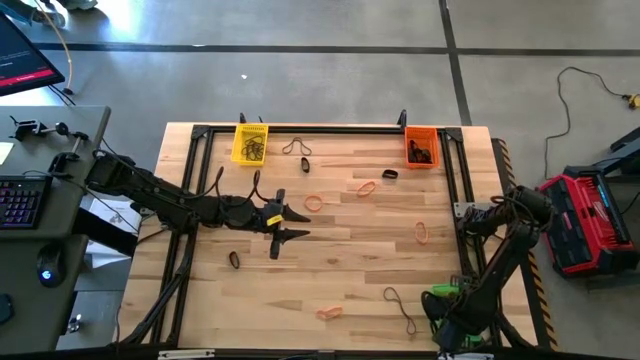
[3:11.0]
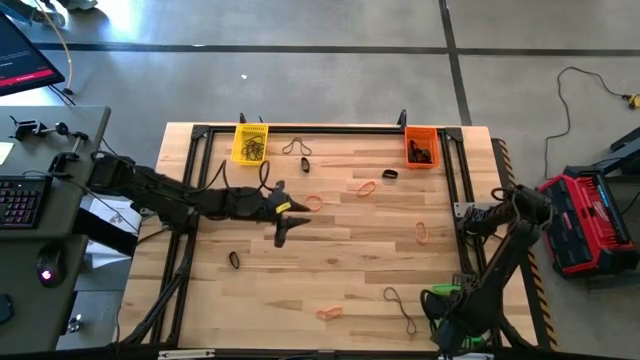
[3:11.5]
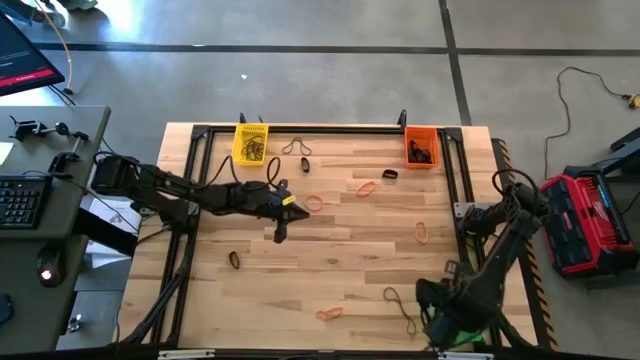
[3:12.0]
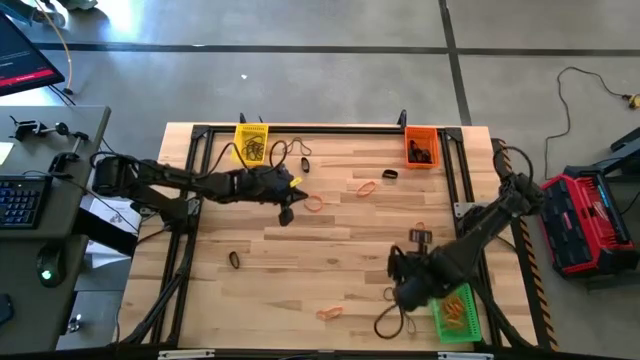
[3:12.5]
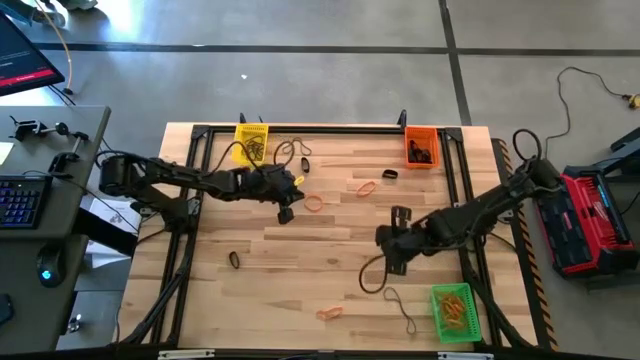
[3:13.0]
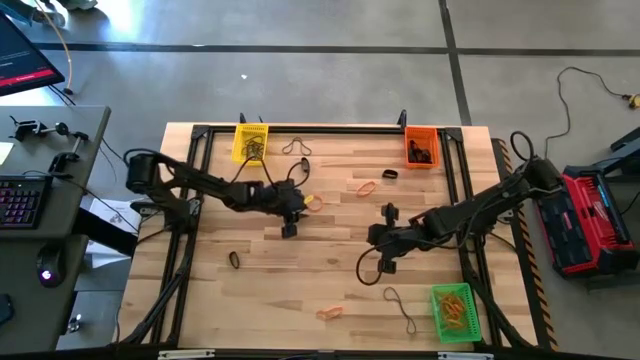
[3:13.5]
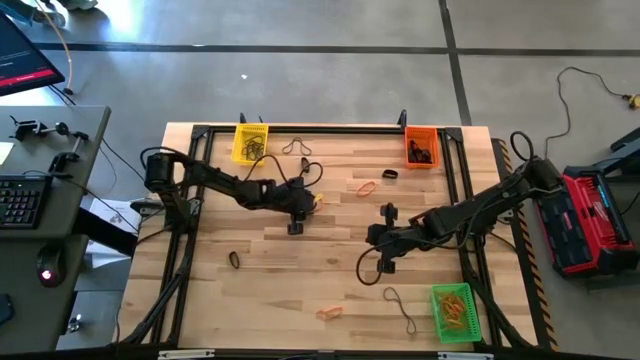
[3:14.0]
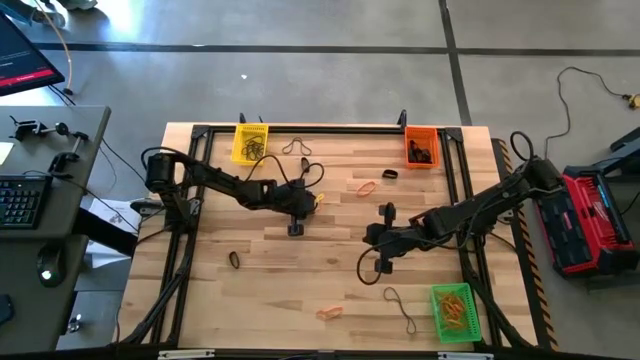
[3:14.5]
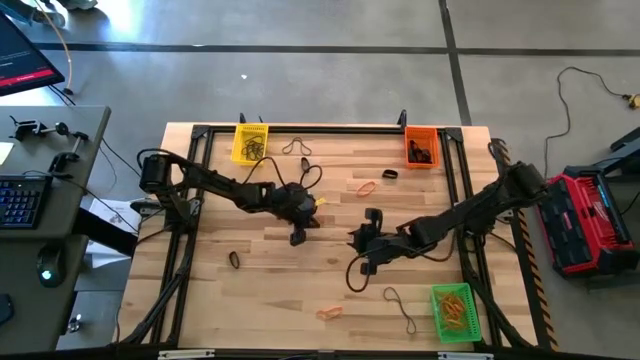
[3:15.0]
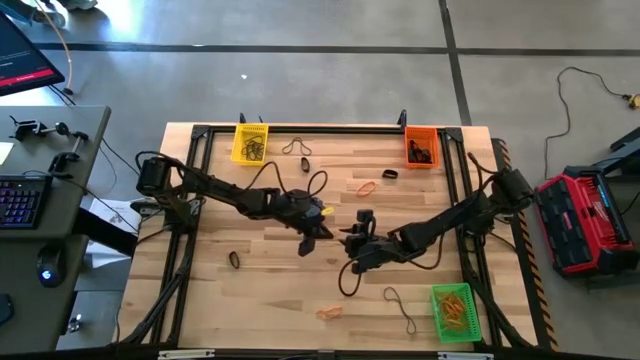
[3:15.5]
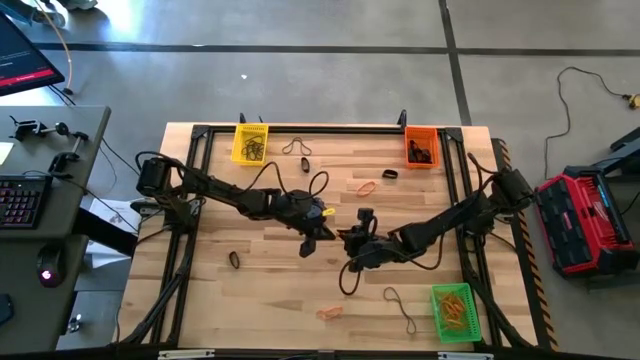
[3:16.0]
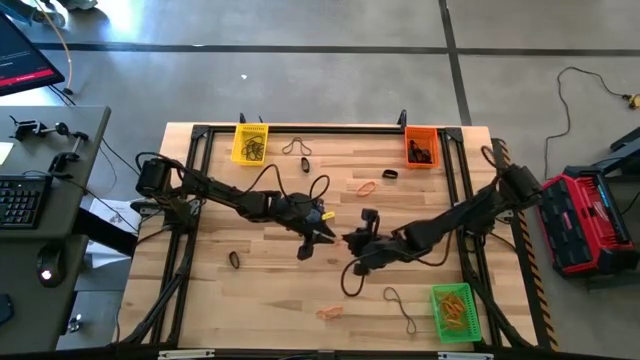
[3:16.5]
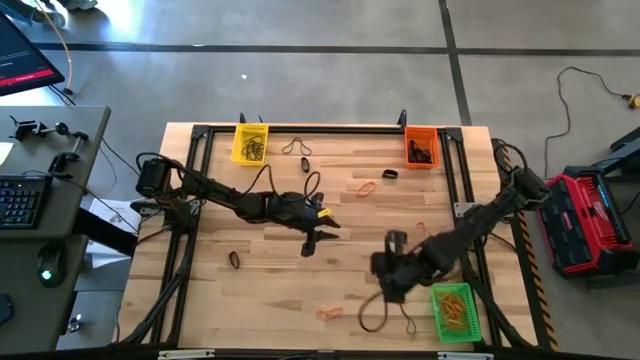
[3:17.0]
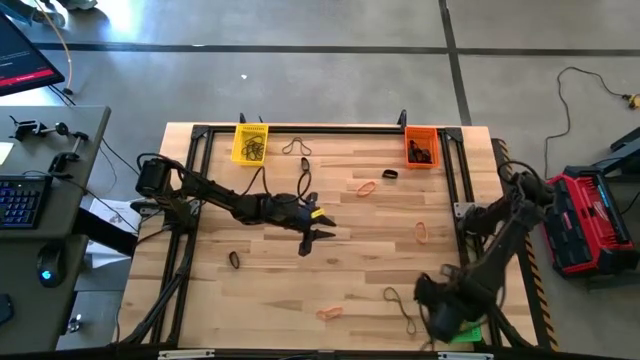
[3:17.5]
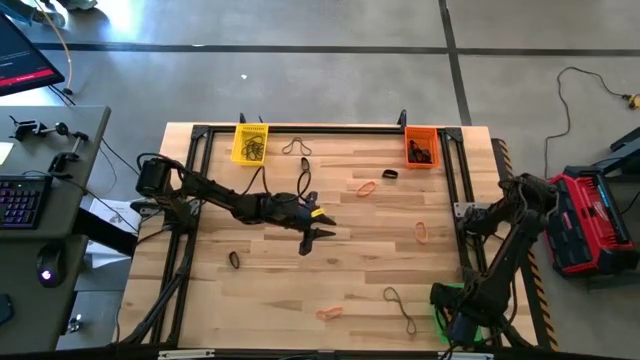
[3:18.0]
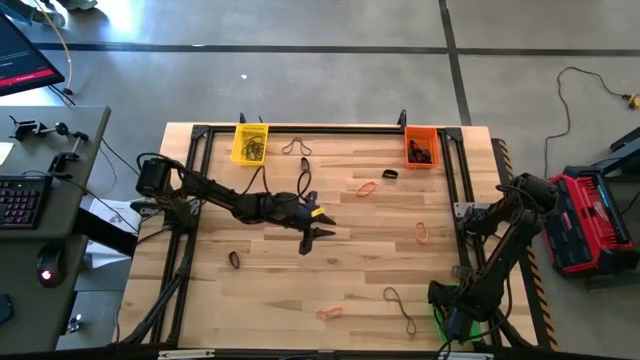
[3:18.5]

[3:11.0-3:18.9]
Task: Sort rubber bands into baskets
Put the orange rubber band into the green bin

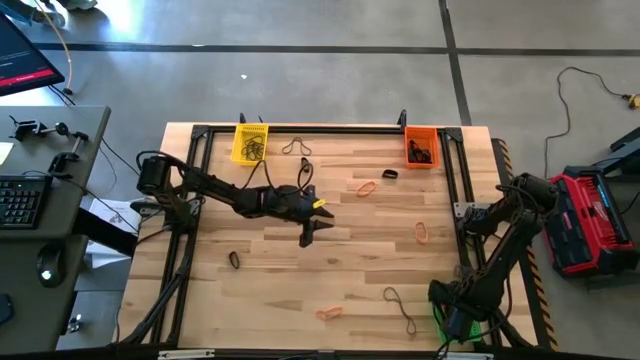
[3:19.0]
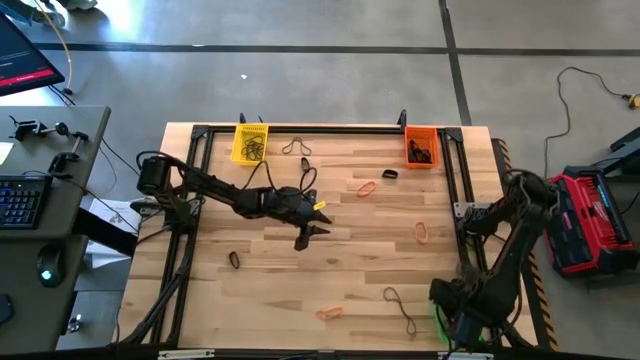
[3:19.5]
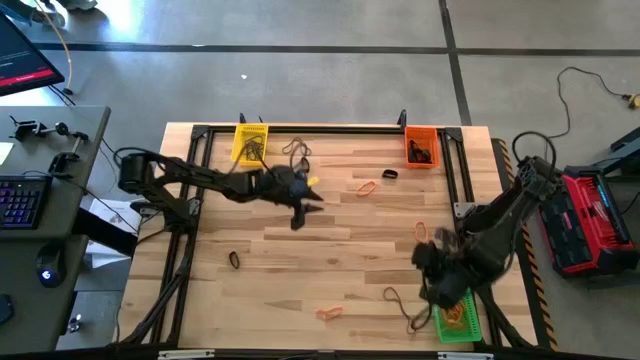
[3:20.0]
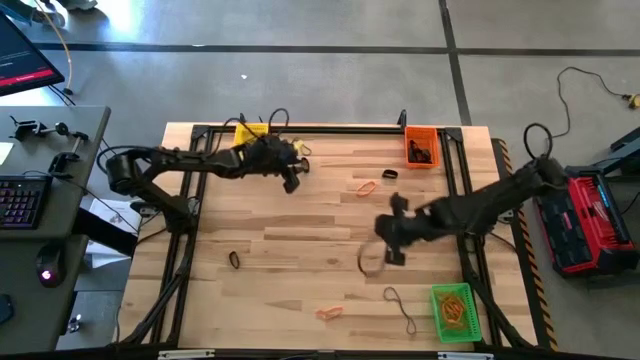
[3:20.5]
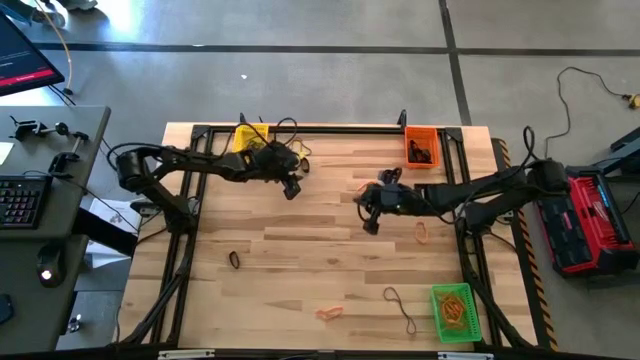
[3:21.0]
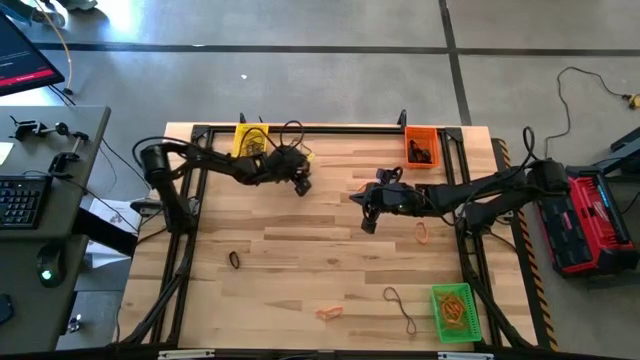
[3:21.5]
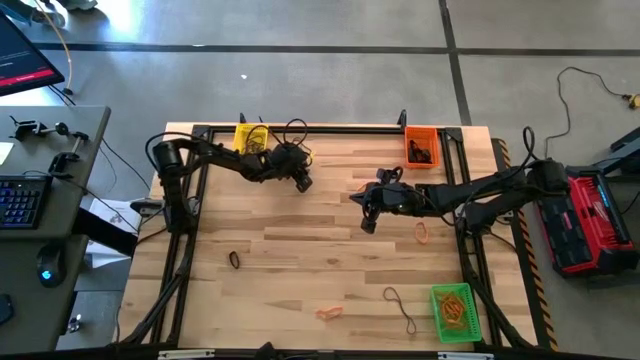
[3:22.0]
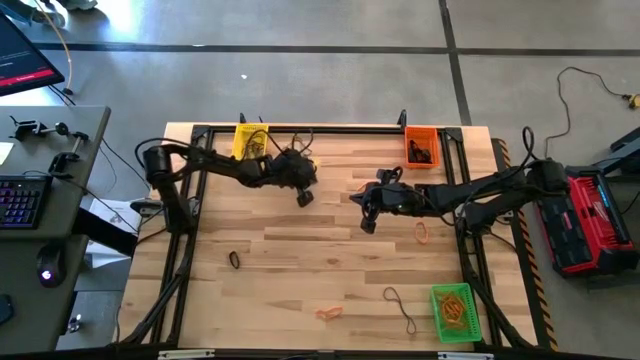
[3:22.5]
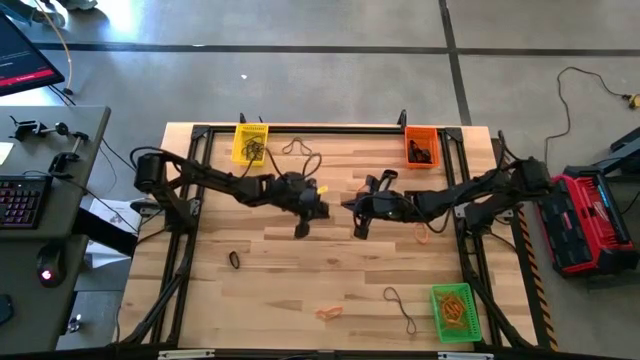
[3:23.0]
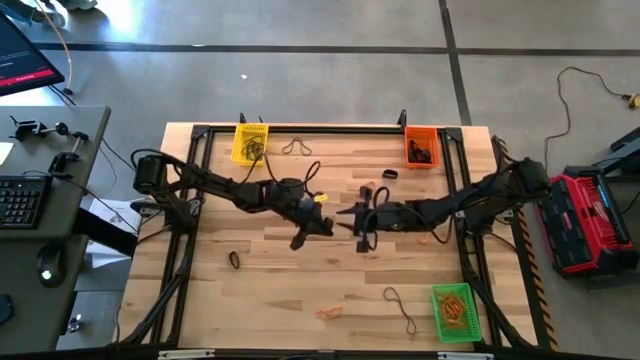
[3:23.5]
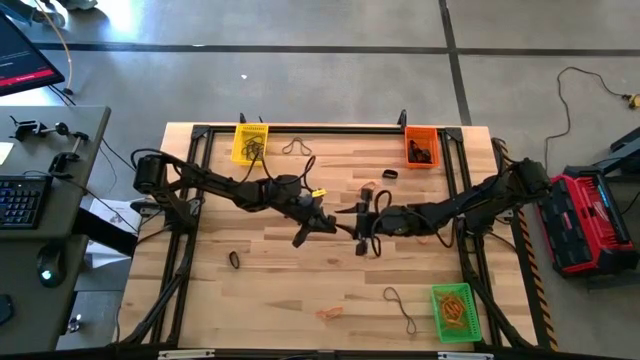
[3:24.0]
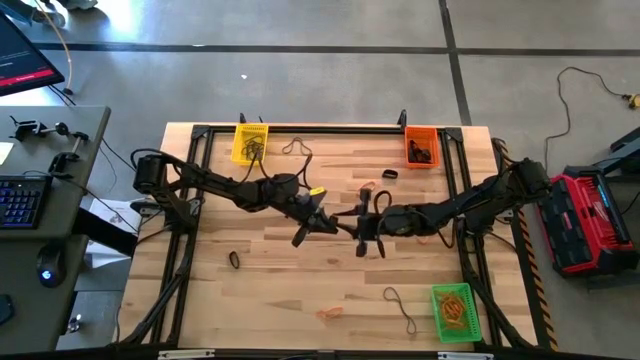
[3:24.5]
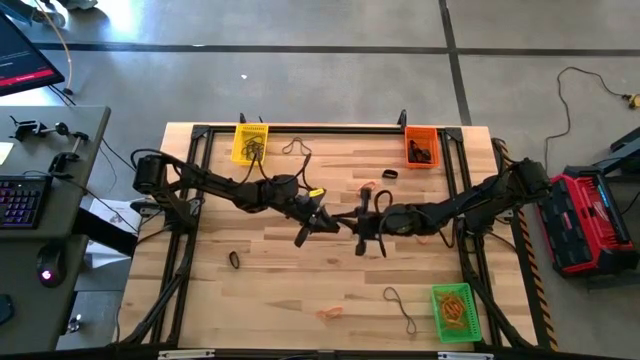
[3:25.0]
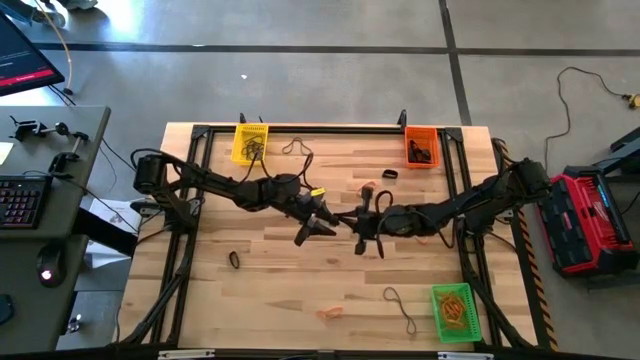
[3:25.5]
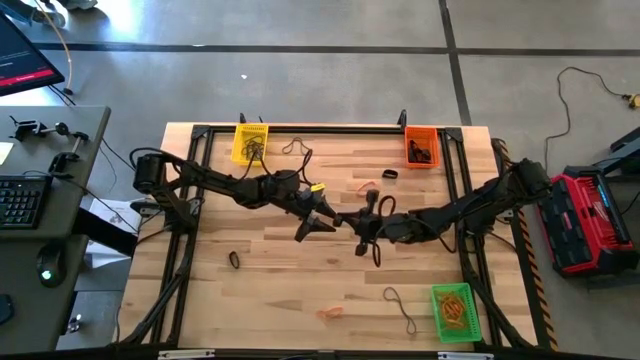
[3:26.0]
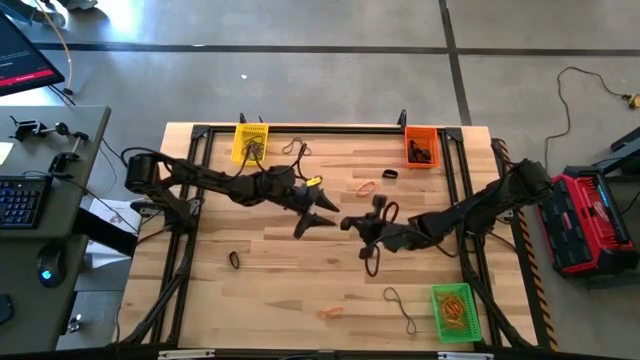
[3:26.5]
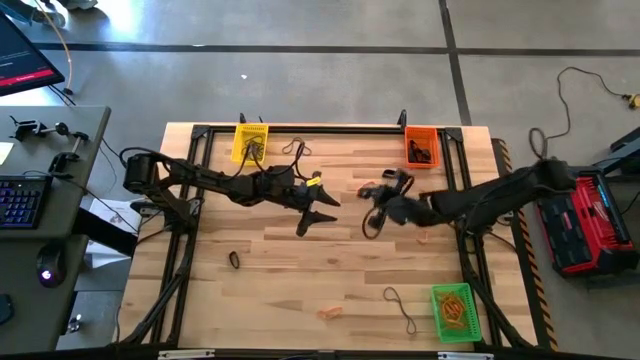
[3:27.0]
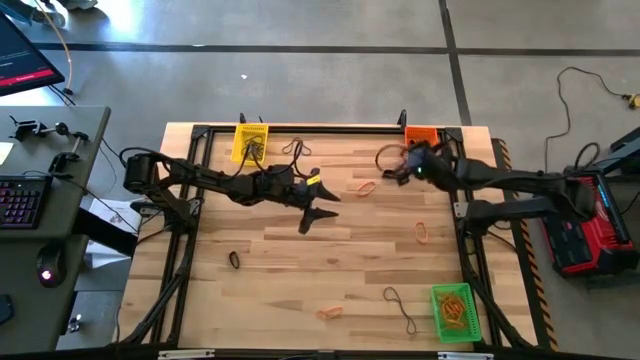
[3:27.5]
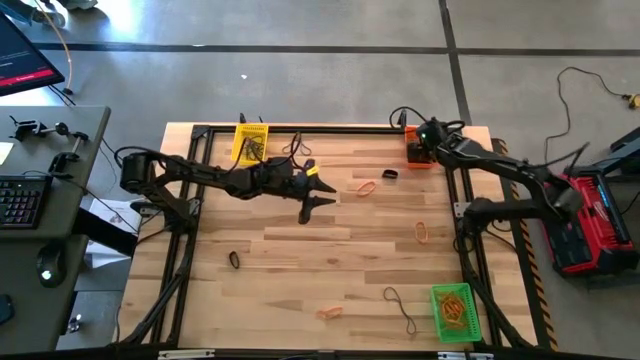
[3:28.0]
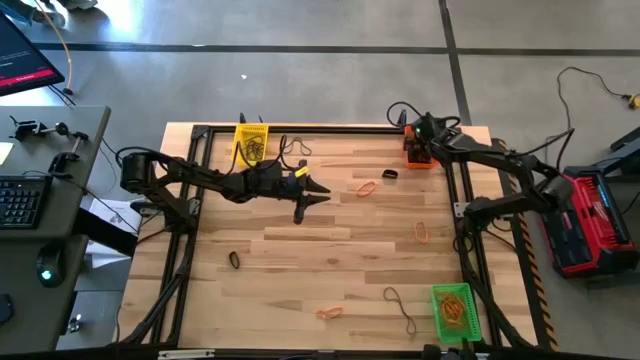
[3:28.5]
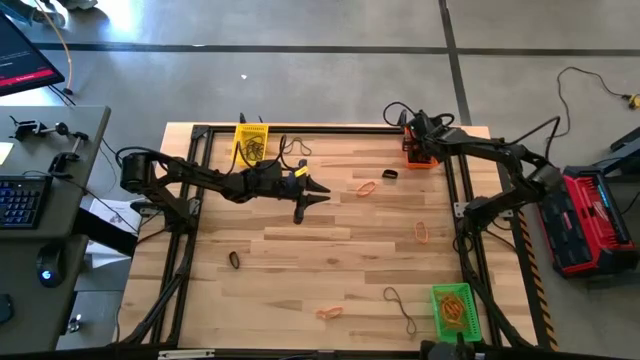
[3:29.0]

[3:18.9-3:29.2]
Put the black rubber band into the orange bin

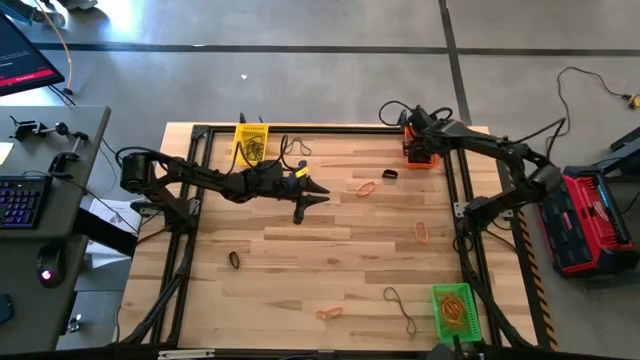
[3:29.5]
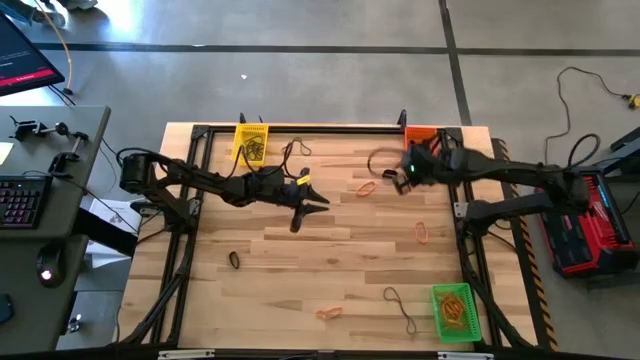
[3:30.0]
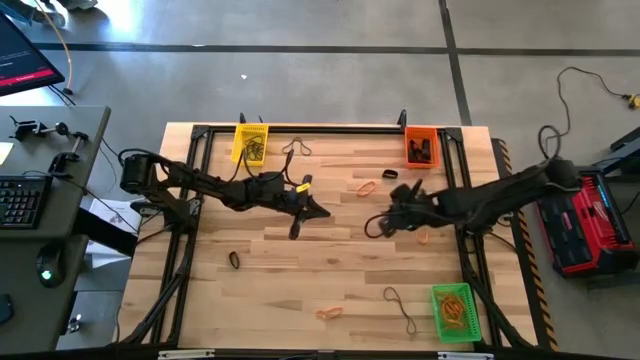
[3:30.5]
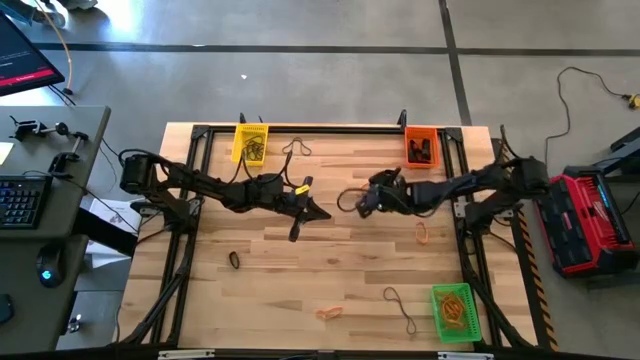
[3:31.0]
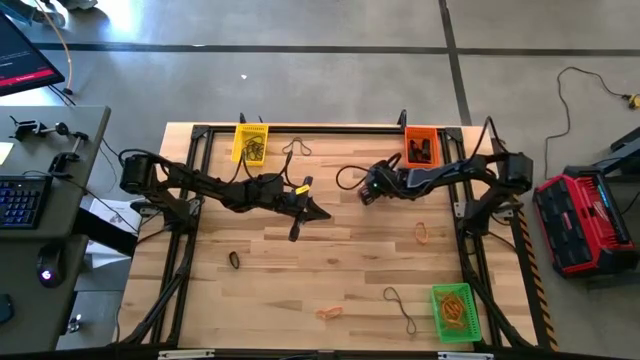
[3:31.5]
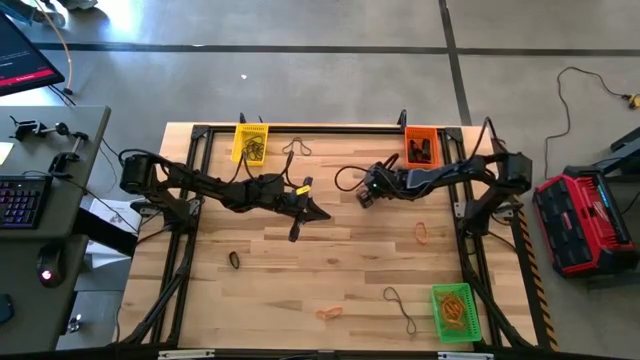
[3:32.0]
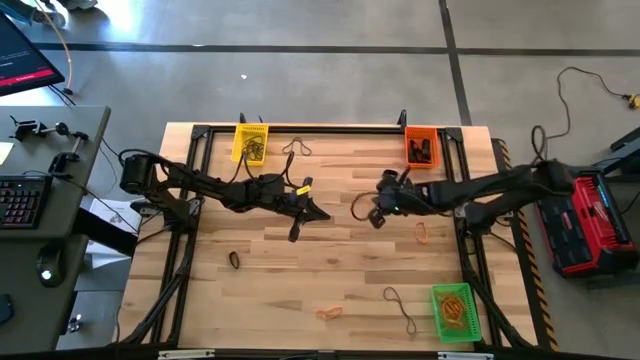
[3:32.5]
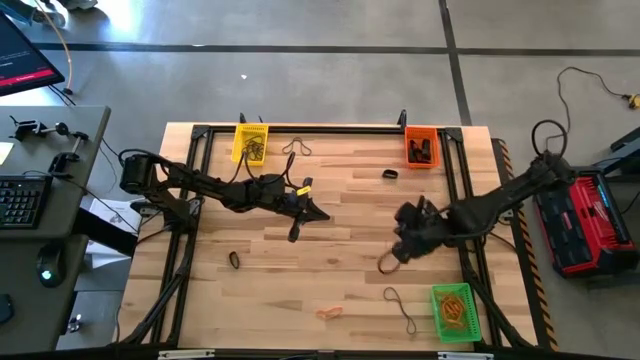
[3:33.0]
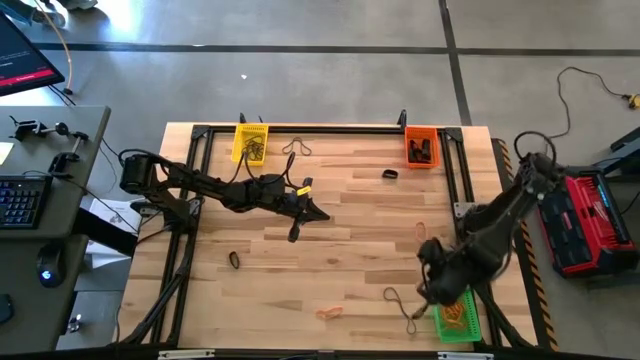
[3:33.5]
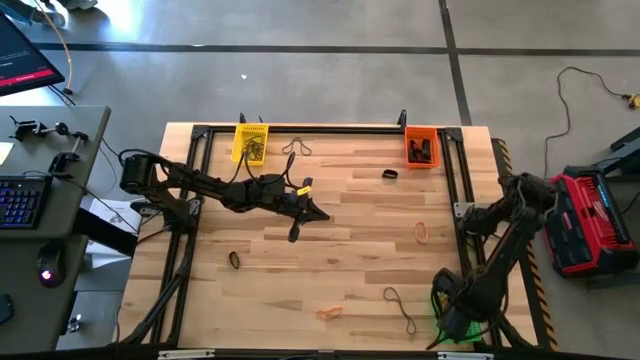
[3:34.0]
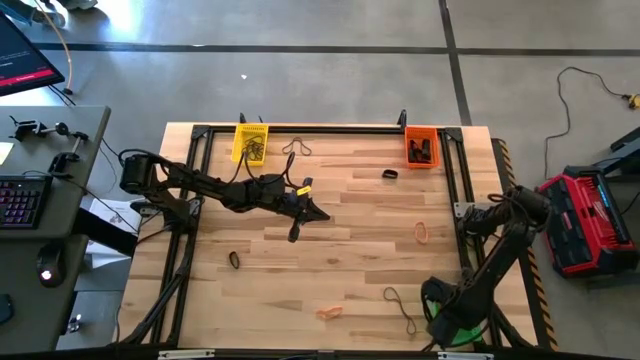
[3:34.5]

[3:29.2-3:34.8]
Put the orange rubber band into the green bin
